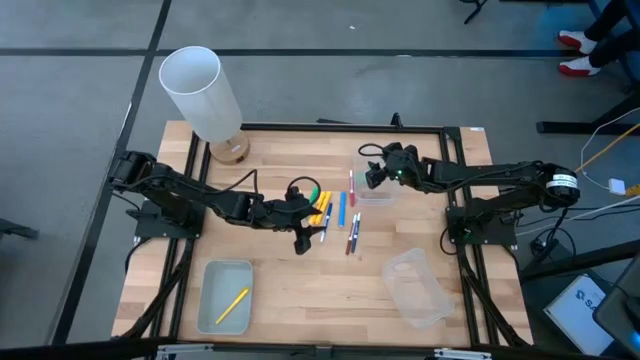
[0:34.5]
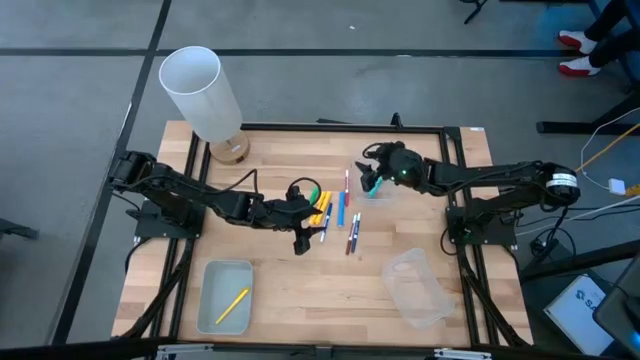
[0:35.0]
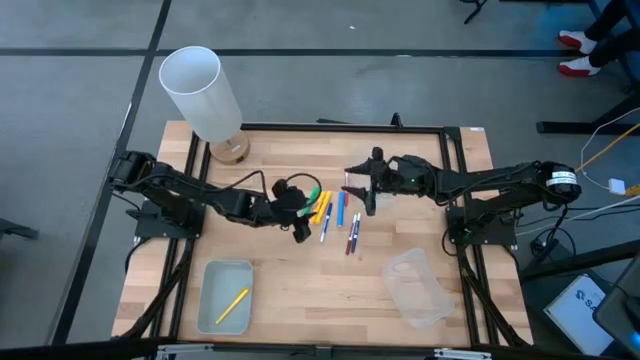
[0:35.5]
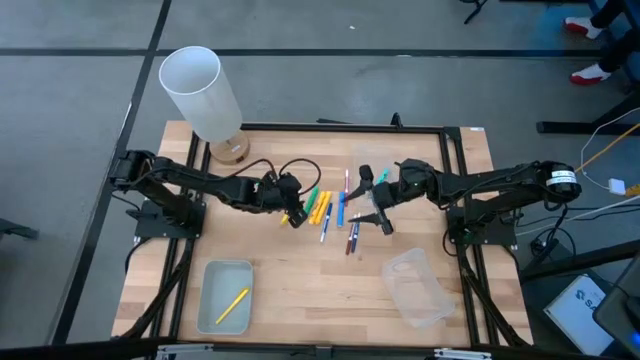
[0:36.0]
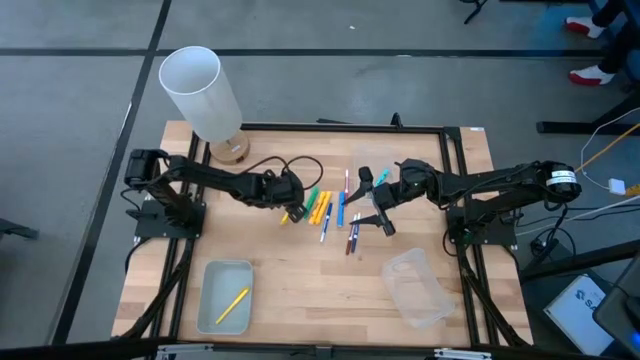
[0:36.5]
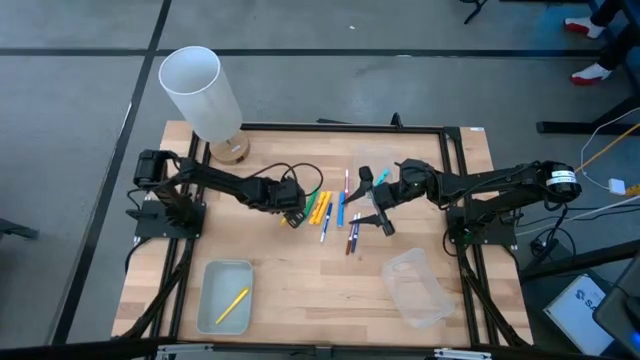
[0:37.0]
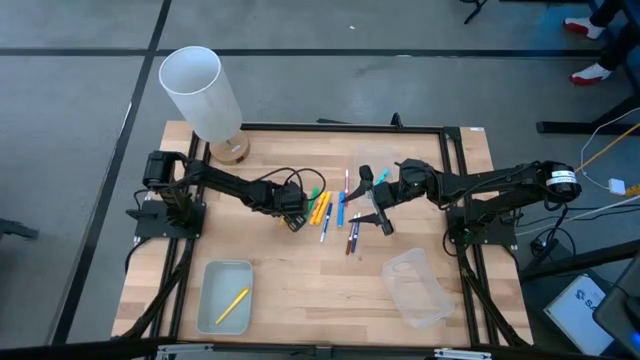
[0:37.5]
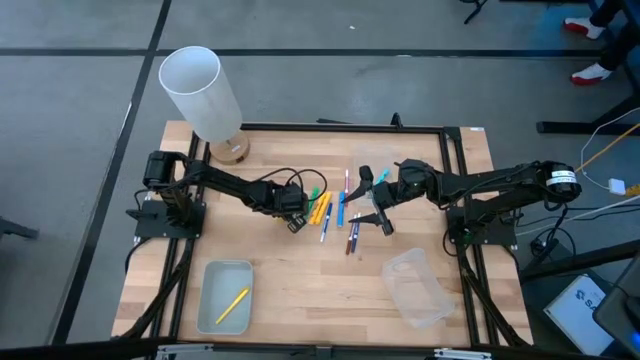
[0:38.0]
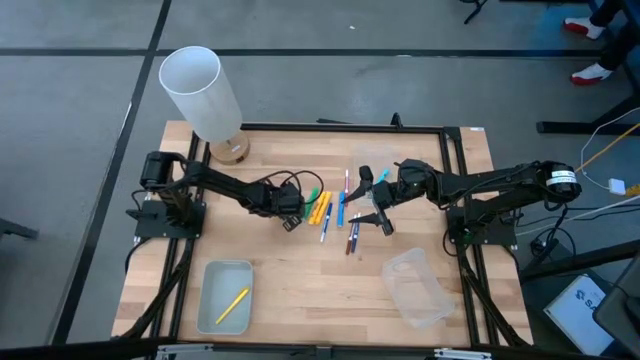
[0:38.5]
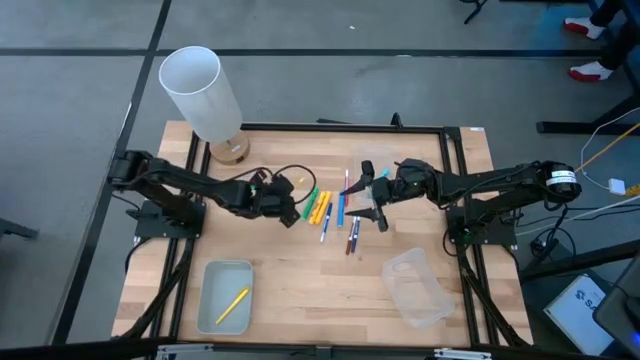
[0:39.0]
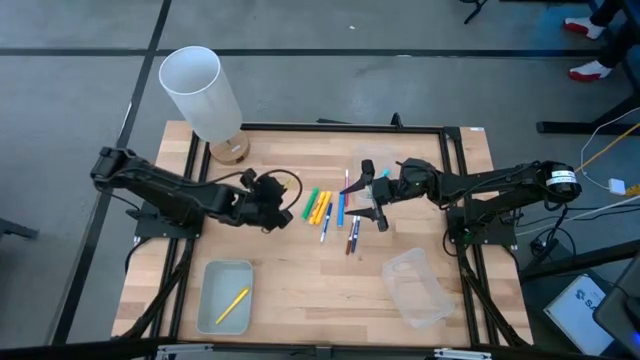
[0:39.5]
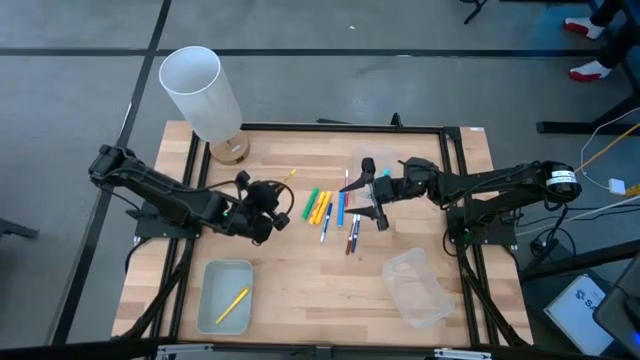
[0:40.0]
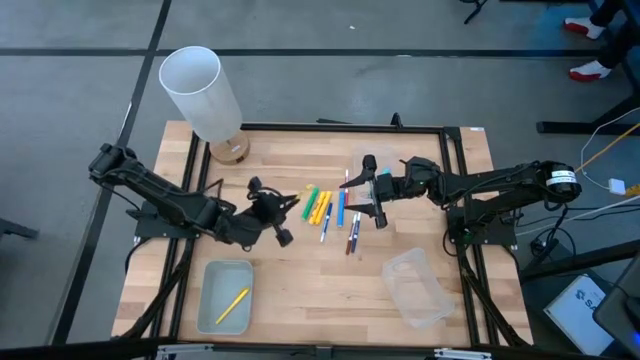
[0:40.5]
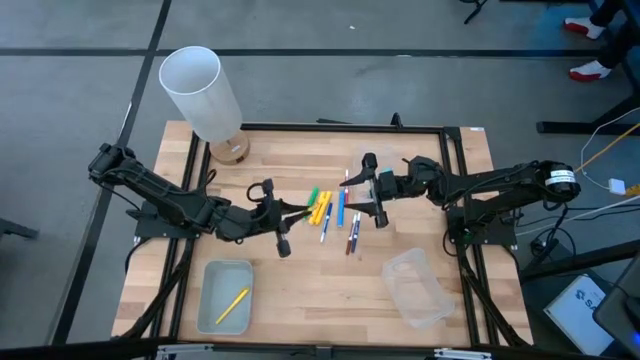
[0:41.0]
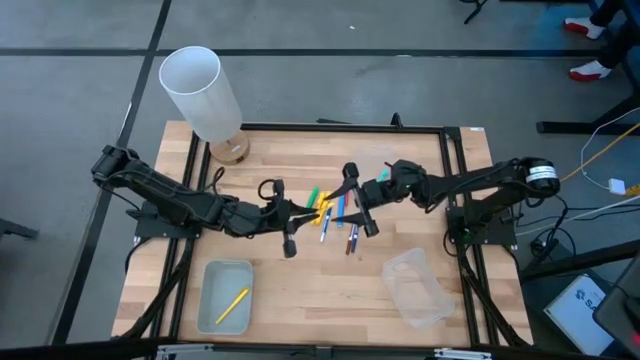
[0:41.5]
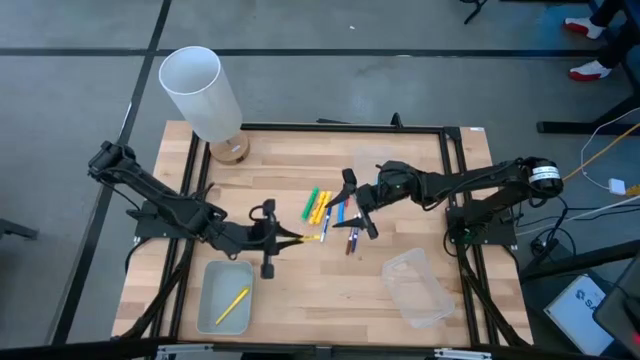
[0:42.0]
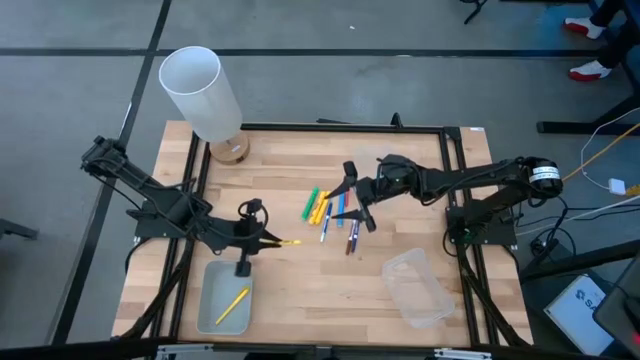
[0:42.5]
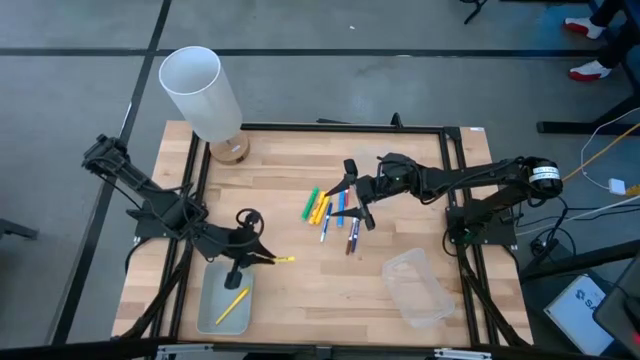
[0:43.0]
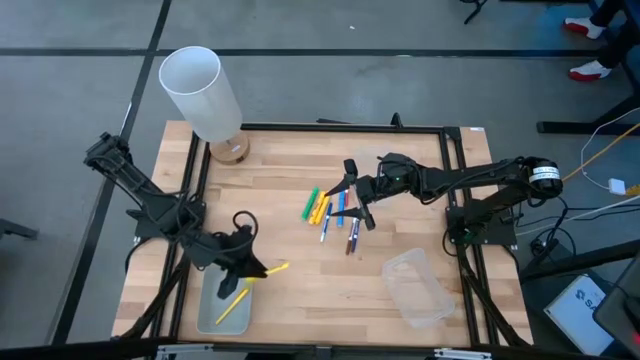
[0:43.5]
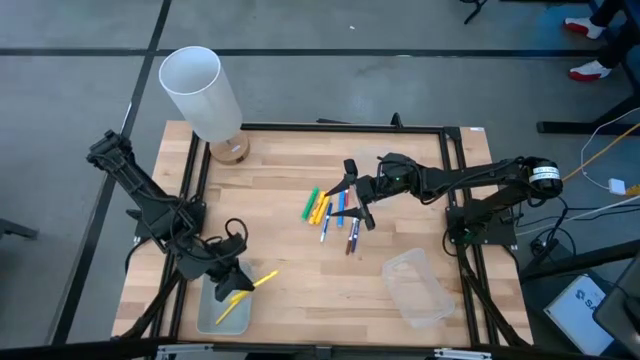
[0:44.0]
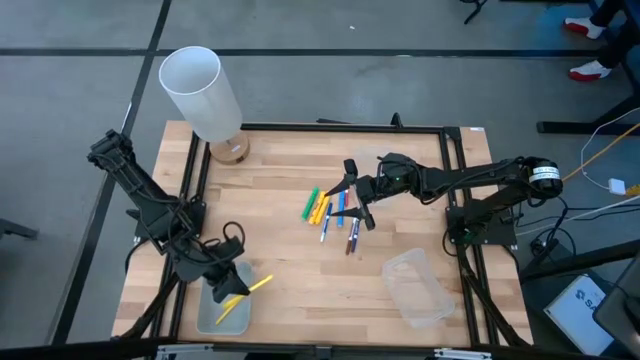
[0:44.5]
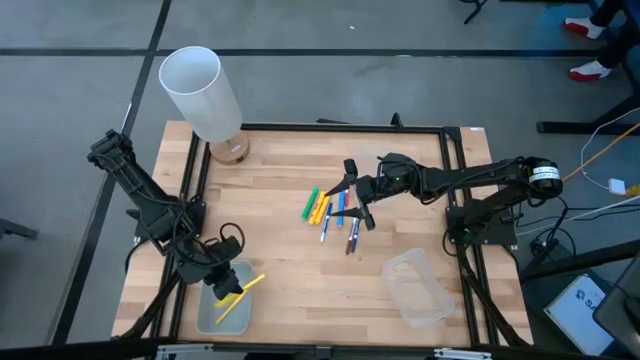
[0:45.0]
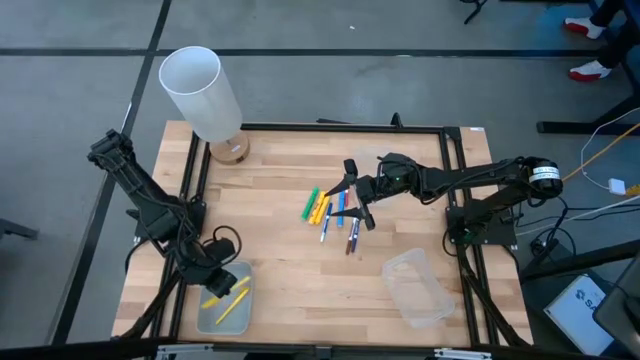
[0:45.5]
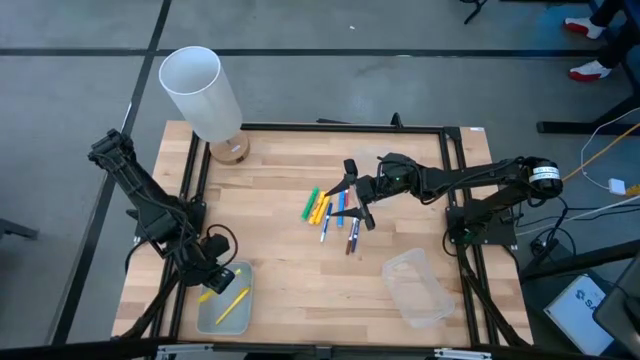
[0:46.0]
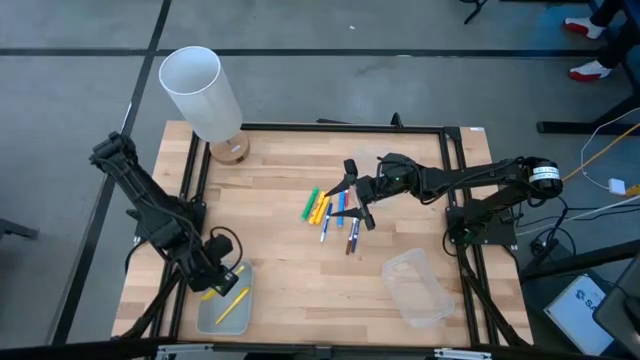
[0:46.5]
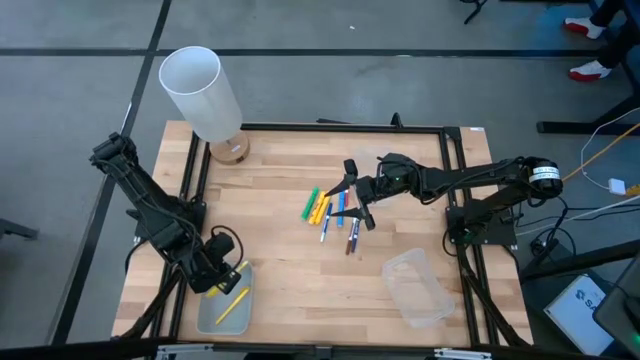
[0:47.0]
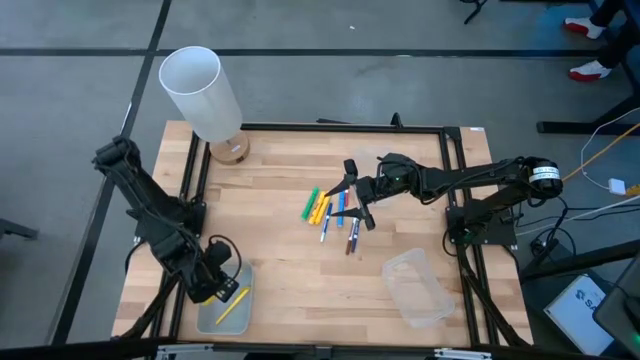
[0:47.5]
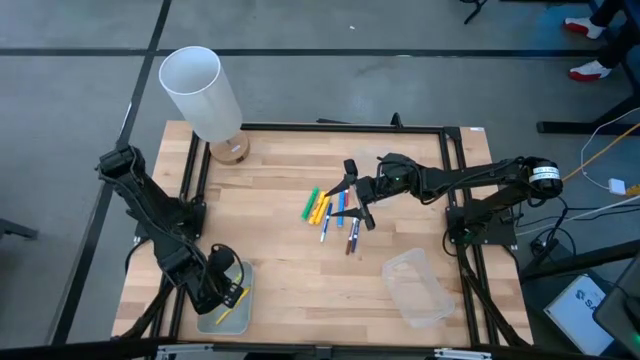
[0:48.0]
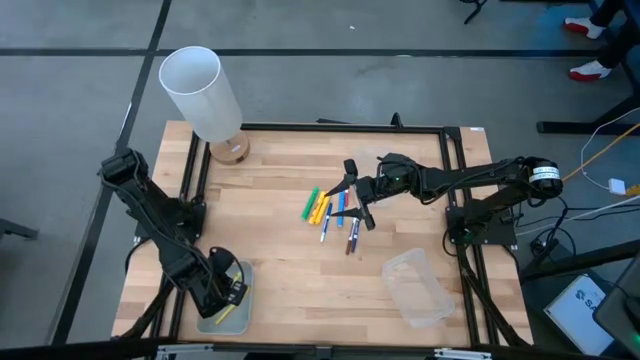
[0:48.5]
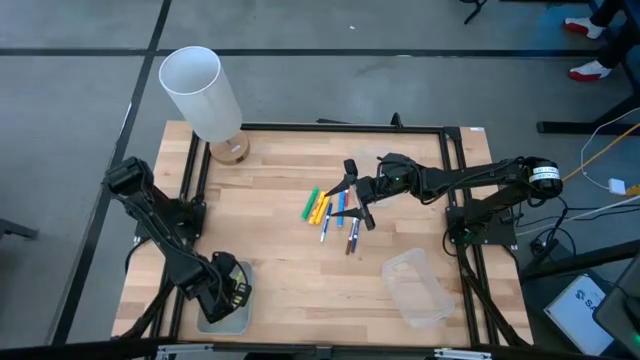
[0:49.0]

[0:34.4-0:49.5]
Task: Pick & Place Markers
Put the yellow pen into the gray bin

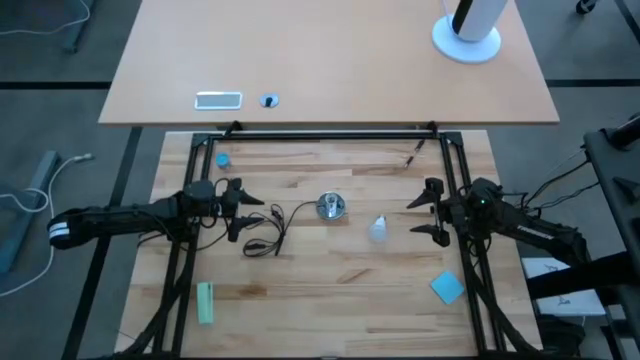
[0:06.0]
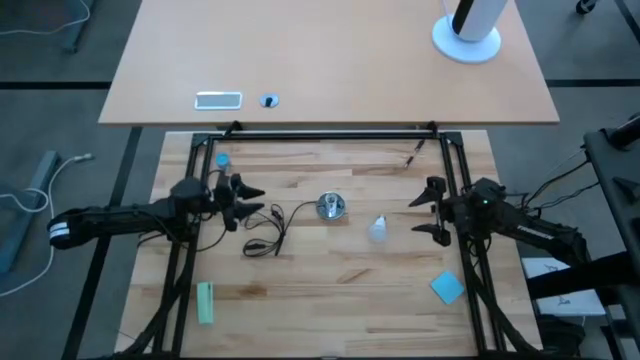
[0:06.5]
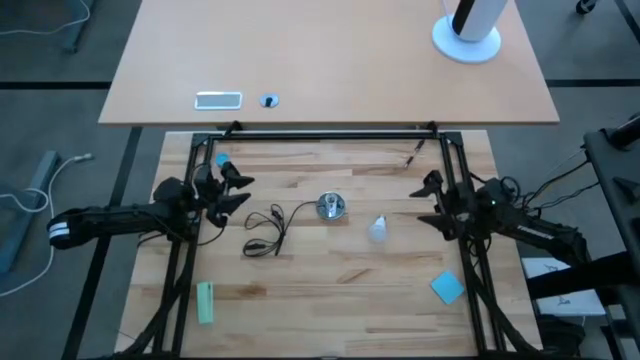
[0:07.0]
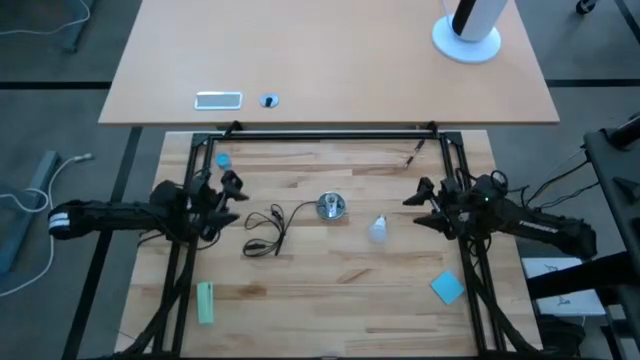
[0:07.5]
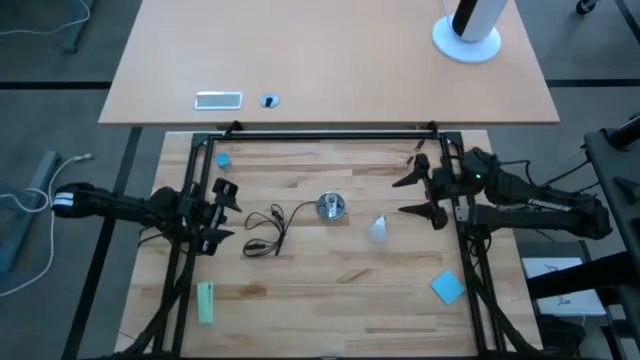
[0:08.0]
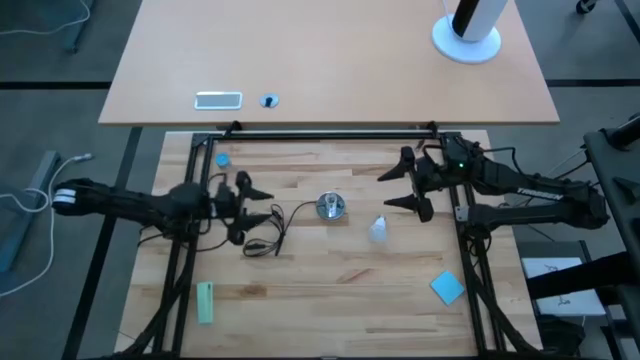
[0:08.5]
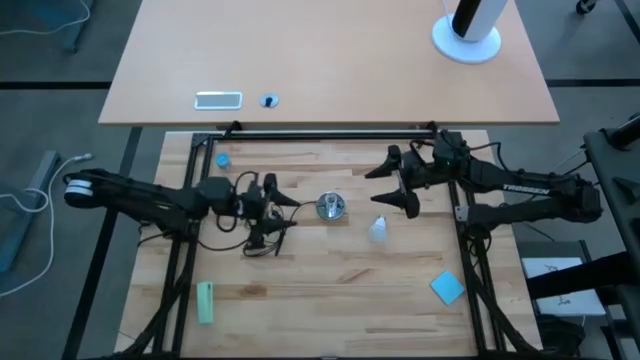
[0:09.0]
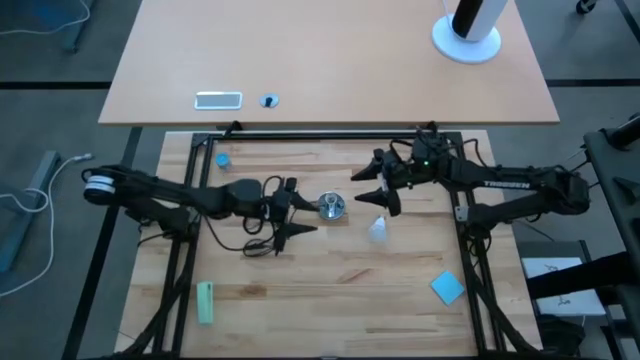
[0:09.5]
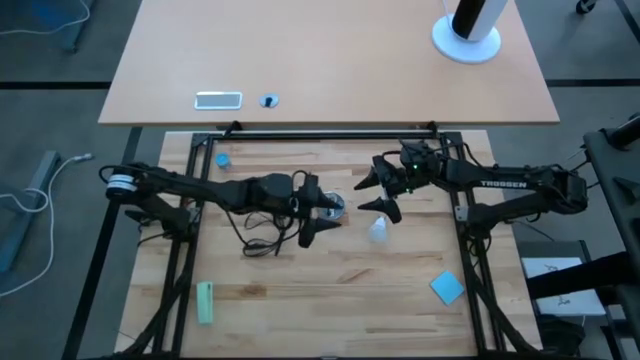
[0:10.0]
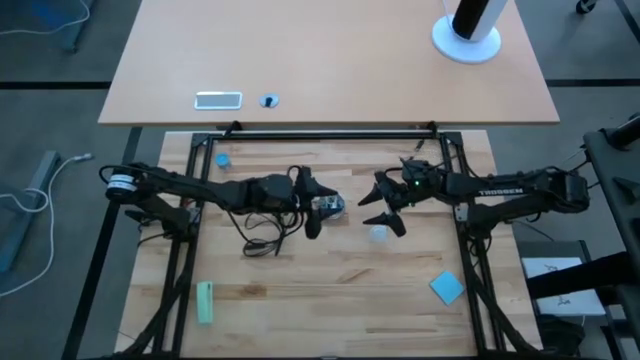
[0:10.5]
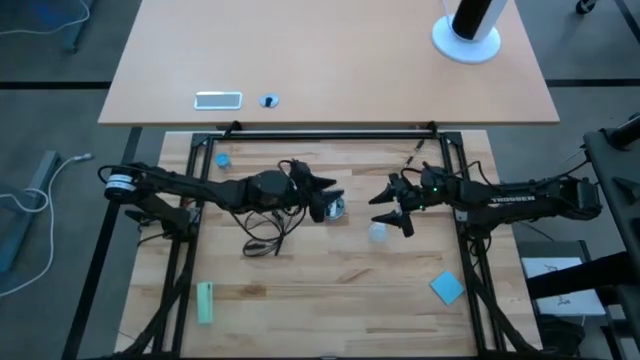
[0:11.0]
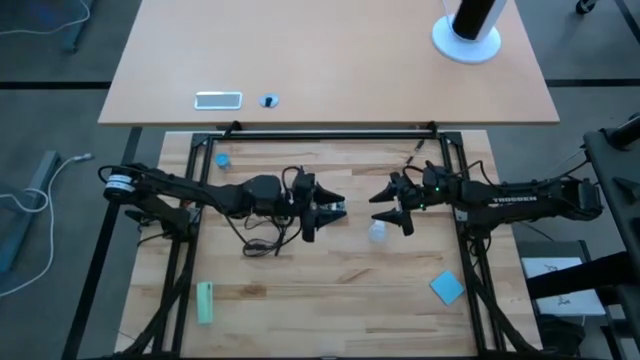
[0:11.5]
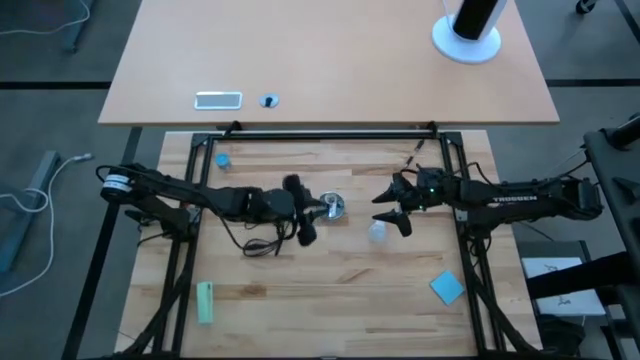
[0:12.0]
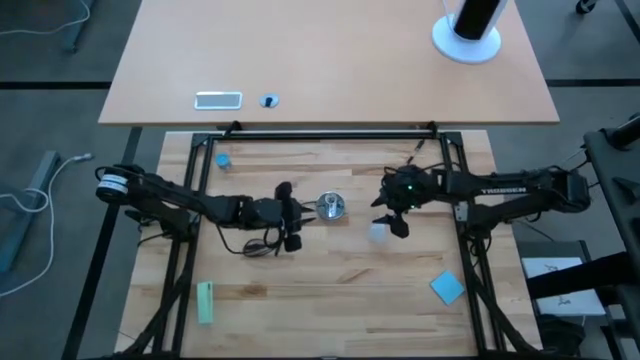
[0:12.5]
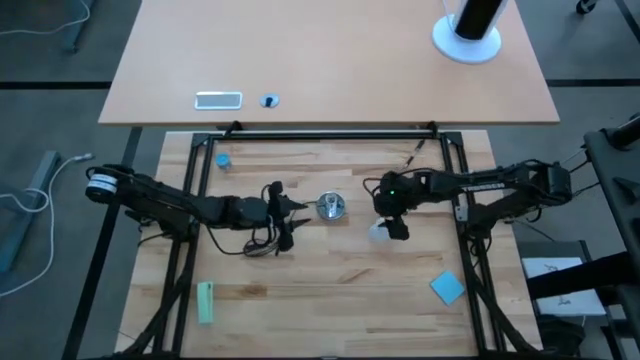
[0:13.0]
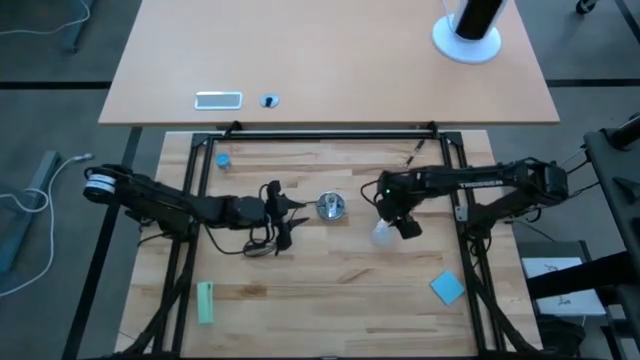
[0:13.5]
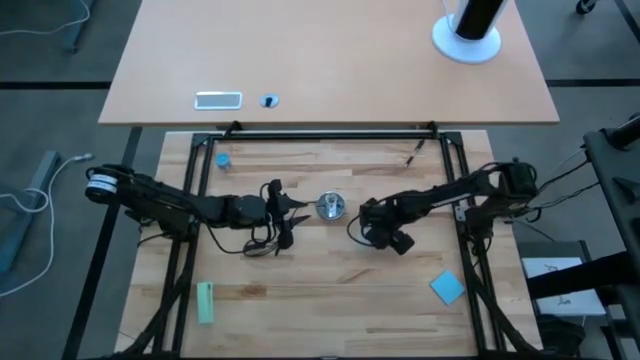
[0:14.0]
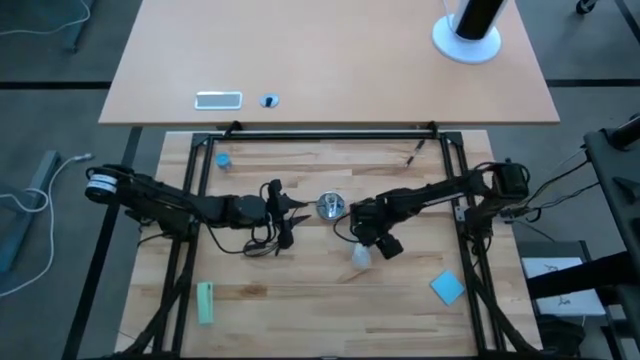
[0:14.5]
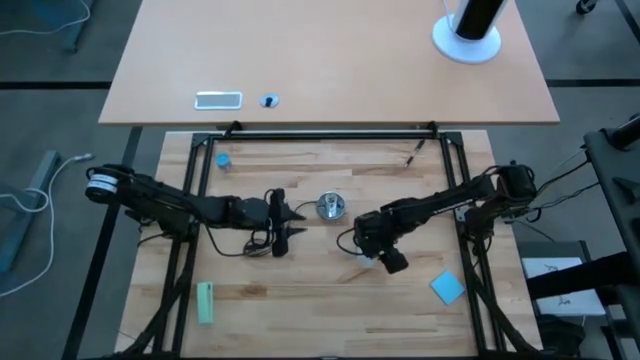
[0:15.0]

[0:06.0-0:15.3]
Task: Screw lightbulb
Insert the white lightbulb into the metal lamp
